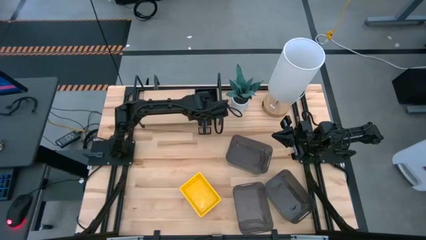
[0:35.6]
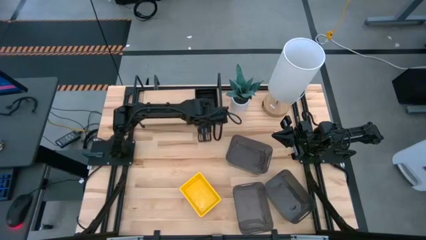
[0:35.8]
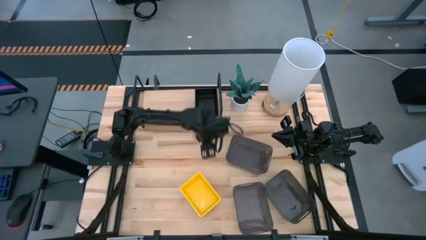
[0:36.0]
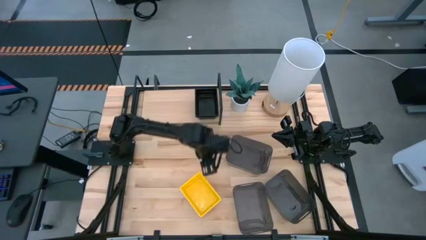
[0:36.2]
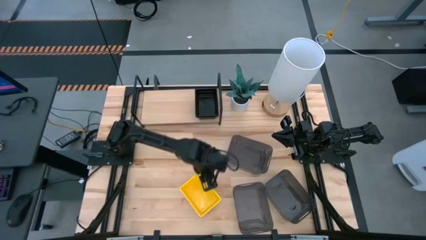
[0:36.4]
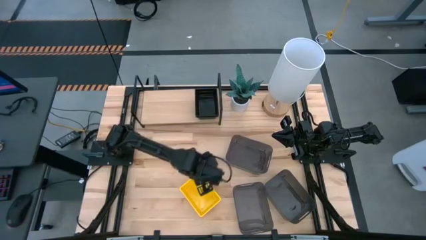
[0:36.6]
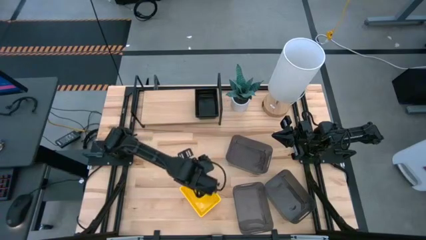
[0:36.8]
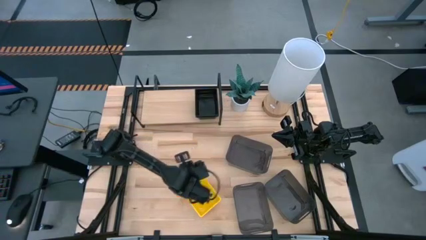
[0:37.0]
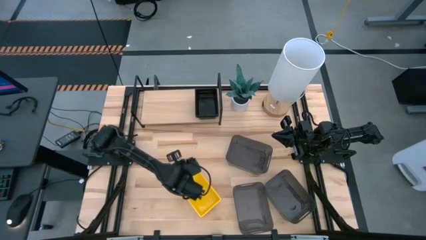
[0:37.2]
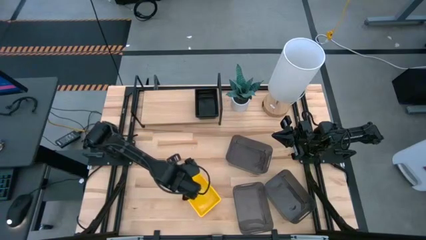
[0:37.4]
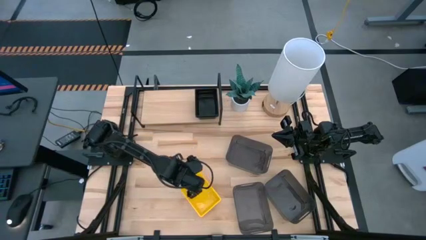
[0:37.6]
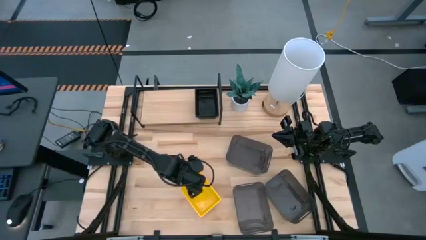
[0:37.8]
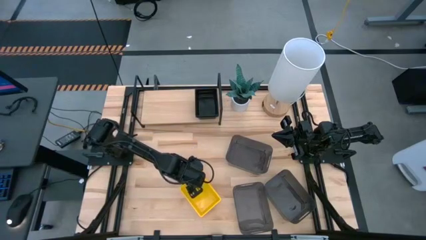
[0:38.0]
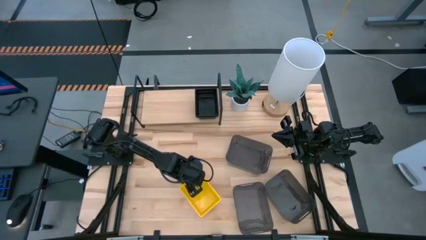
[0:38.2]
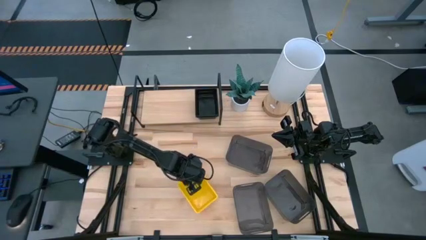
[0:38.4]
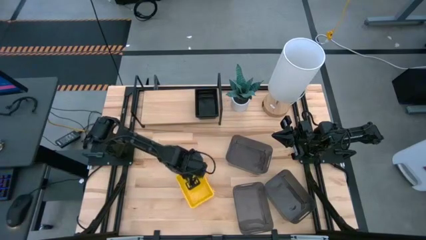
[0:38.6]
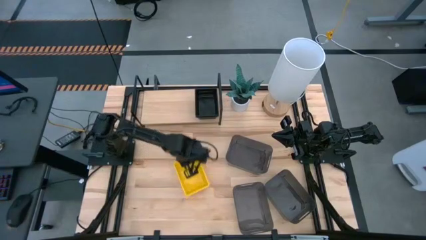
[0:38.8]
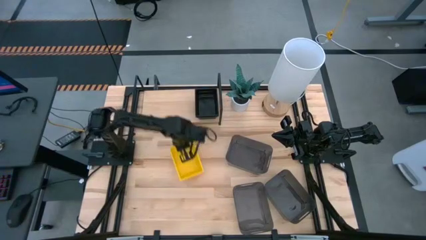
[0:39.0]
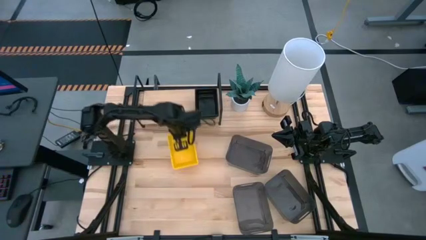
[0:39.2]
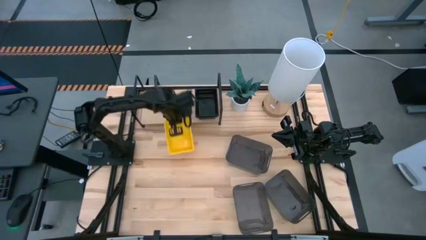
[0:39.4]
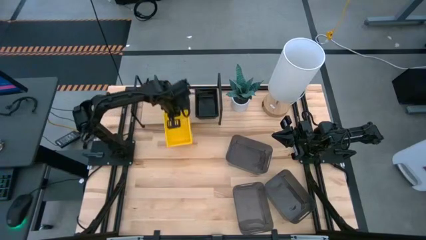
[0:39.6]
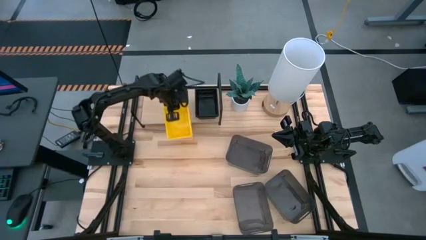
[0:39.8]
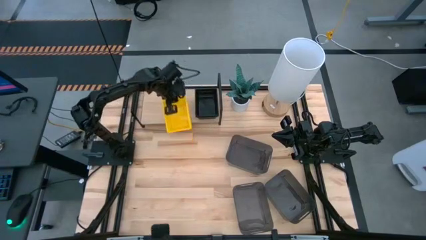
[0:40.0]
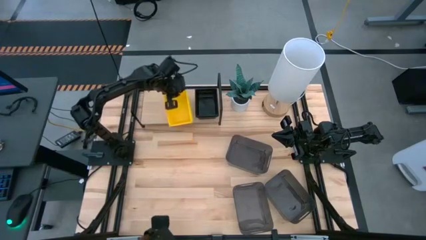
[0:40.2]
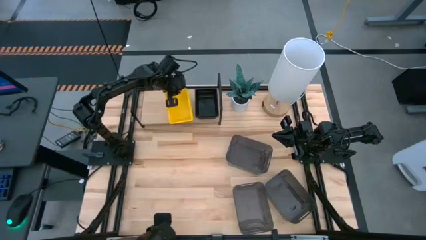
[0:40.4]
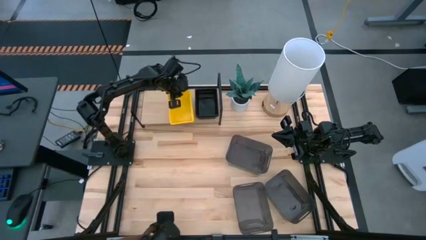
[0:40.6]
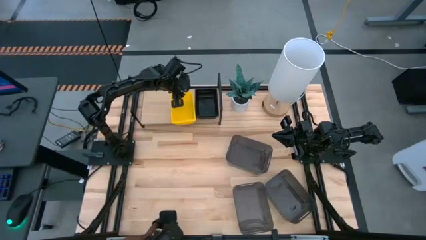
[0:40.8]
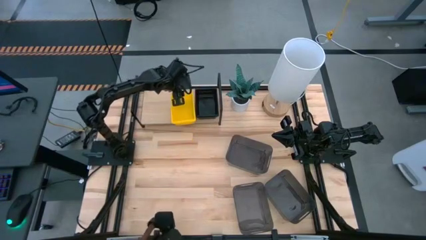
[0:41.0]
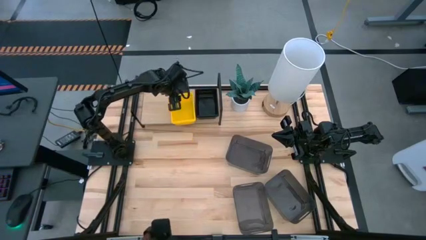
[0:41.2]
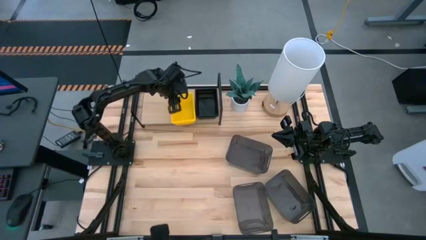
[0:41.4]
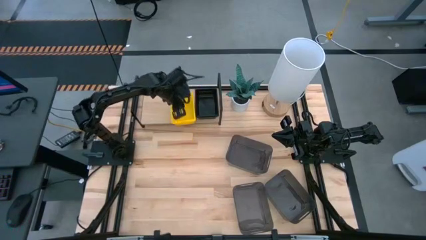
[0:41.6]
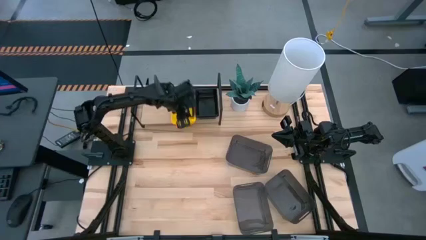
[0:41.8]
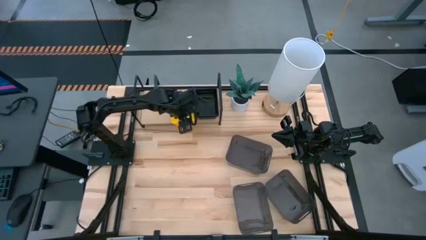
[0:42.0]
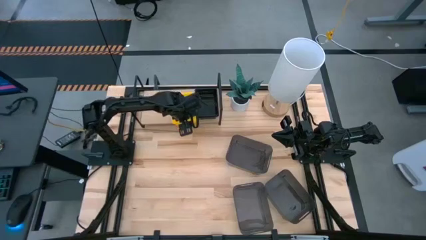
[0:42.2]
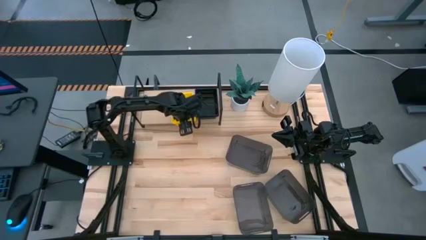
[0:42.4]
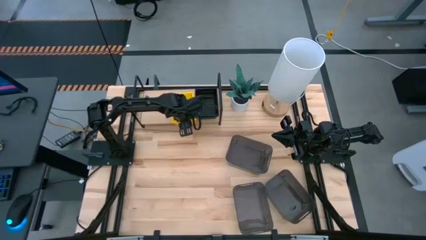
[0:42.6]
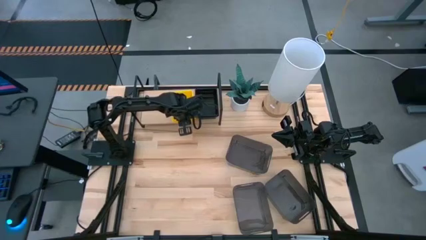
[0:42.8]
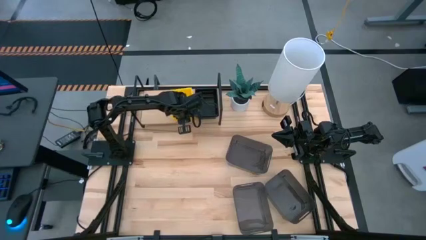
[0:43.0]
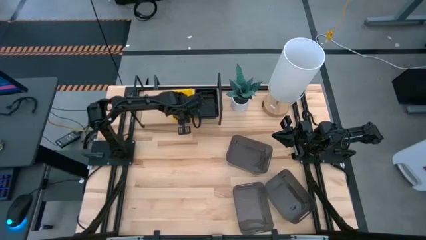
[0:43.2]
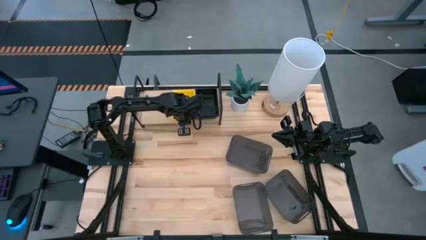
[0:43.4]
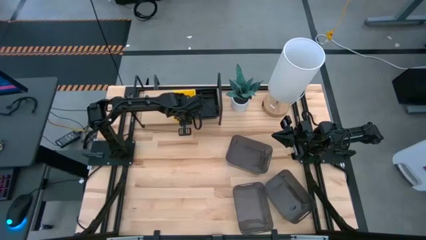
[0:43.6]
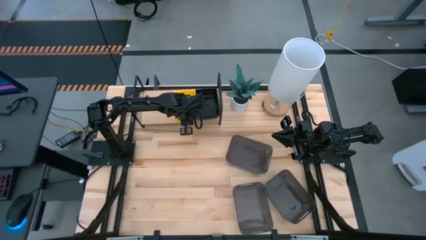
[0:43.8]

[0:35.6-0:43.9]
Task: Stack baskets on shelf by color
Put the stacked yellow bins on the shelf

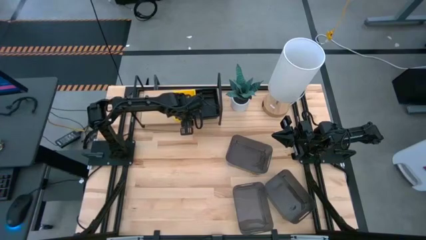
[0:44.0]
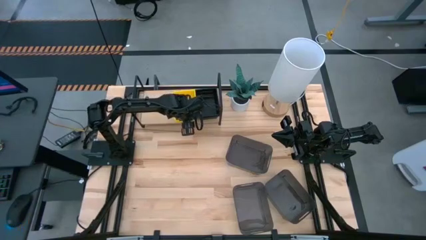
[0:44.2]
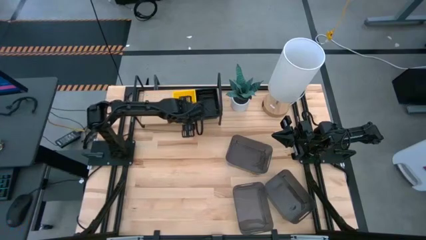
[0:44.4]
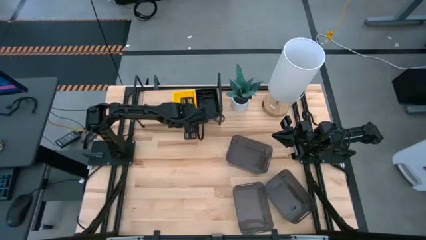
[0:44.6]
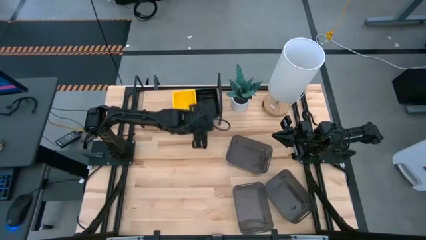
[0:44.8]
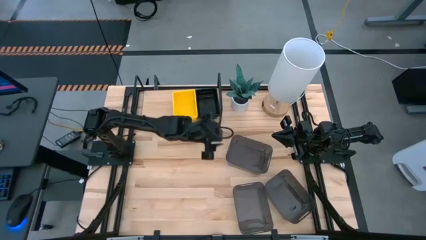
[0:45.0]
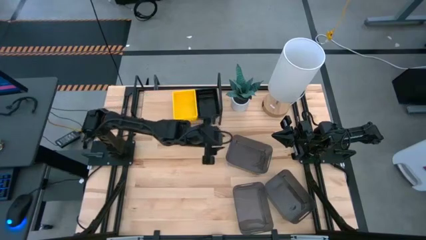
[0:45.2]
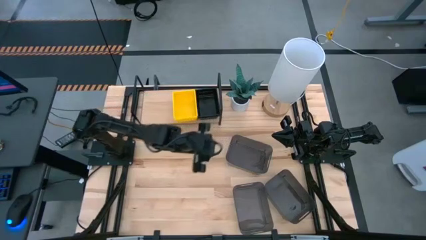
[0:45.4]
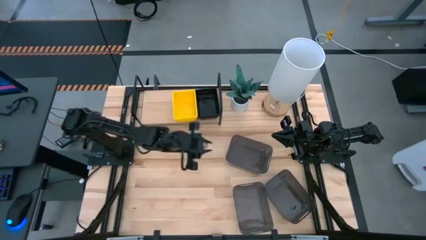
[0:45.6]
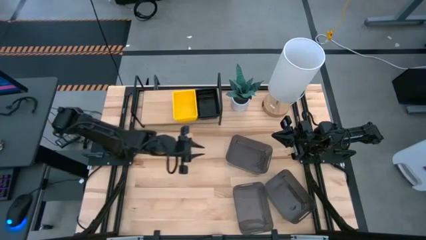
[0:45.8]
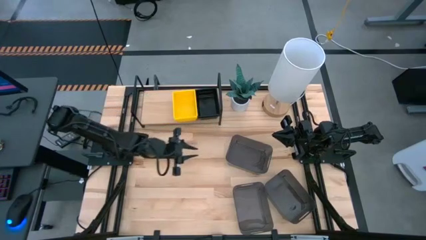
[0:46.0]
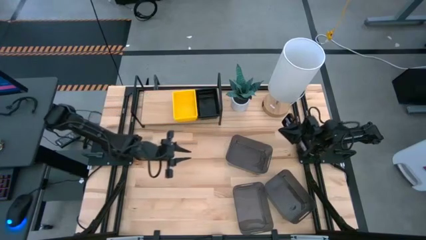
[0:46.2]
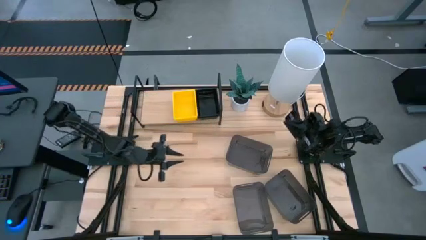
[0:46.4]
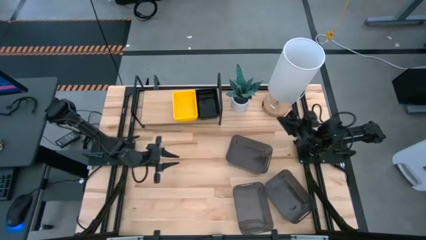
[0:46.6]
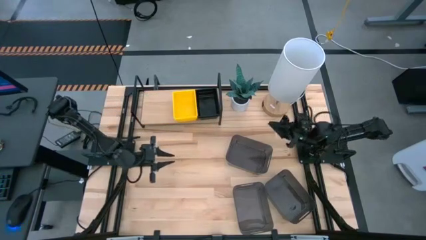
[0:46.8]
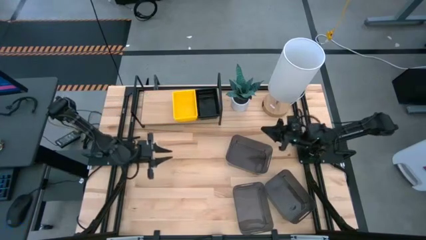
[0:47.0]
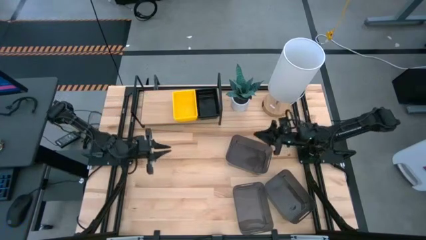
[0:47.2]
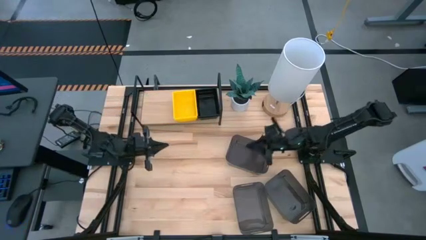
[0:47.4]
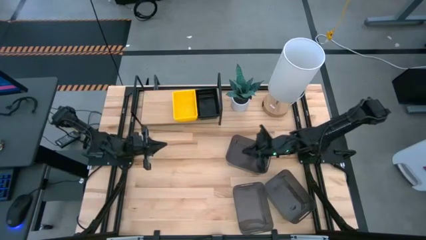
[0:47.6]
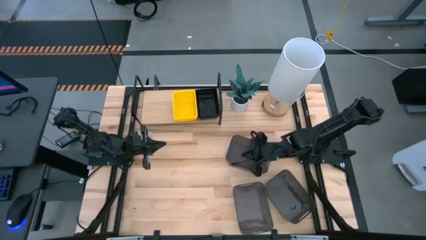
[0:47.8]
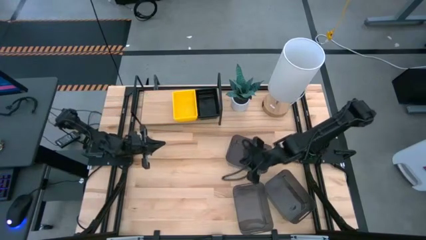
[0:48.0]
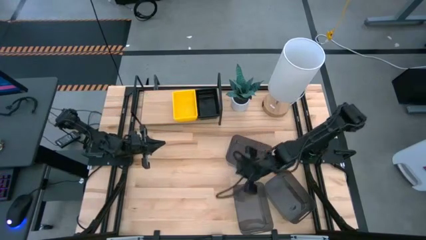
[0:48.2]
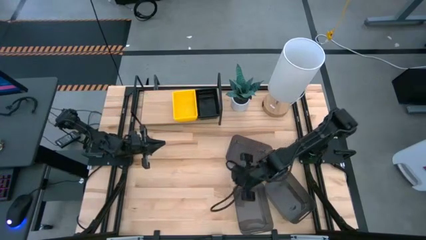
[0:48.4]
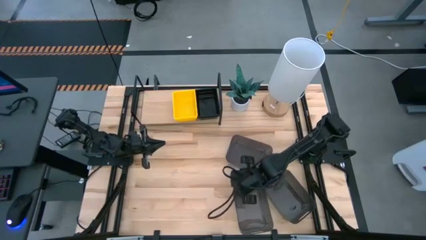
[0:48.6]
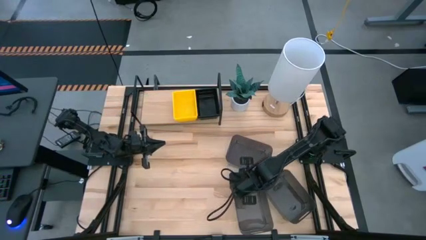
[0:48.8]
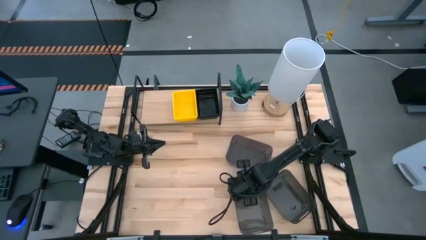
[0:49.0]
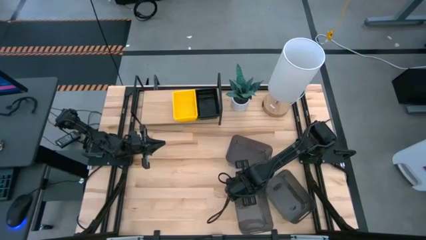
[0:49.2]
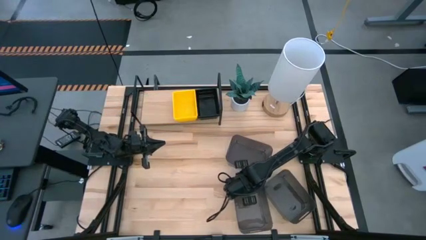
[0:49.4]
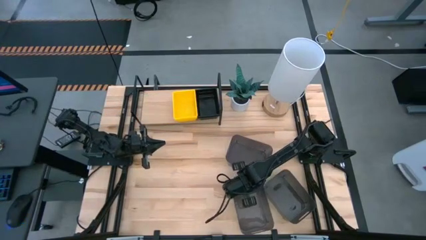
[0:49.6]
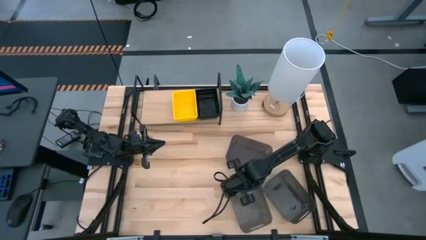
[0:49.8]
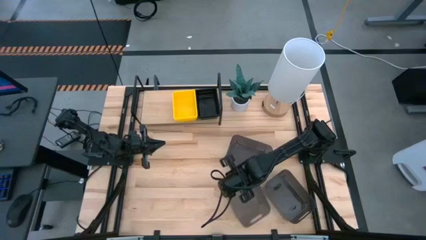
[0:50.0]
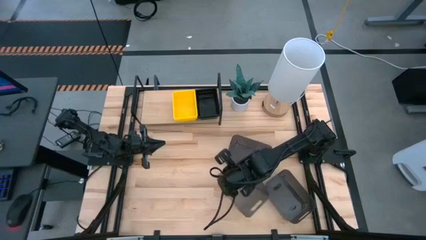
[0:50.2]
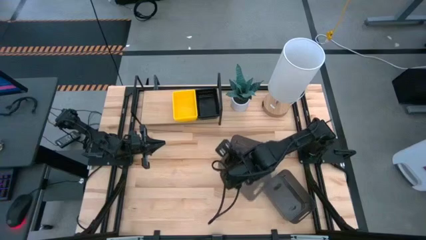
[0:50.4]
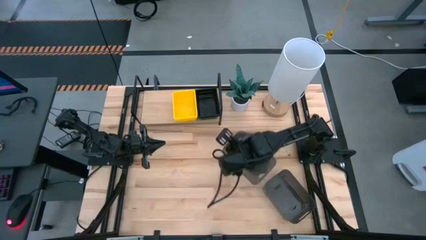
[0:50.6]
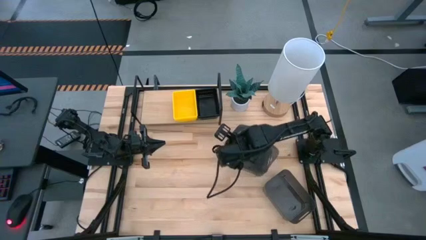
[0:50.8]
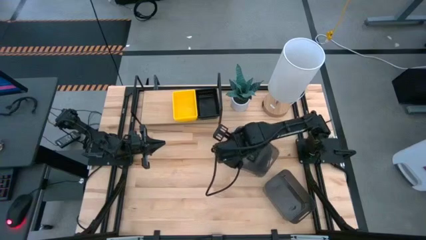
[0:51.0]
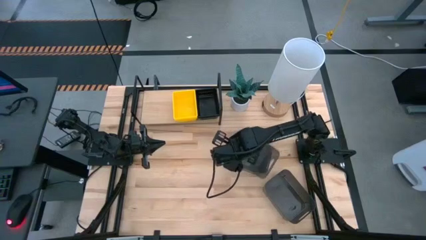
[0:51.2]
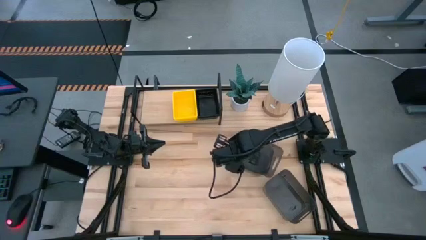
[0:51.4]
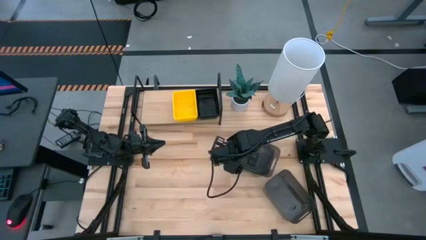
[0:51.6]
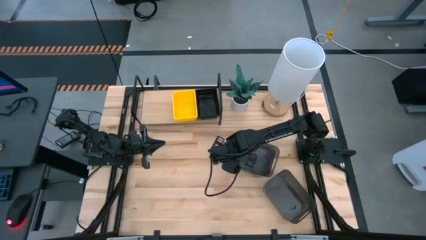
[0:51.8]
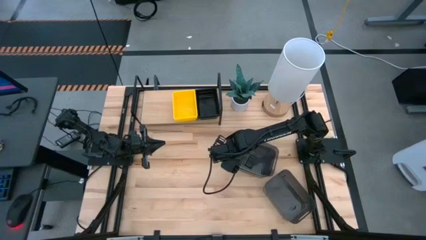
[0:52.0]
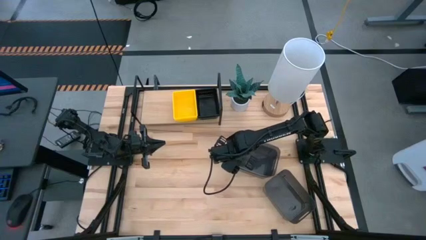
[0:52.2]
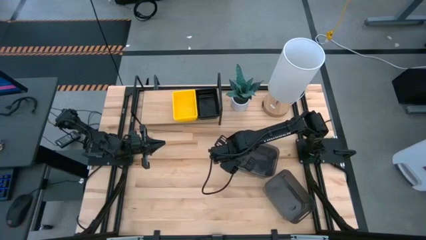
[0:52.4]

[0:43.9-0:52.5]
Stack the left black bin on top of the top black bin
